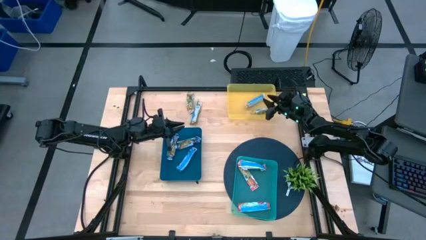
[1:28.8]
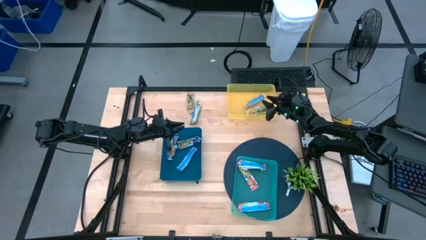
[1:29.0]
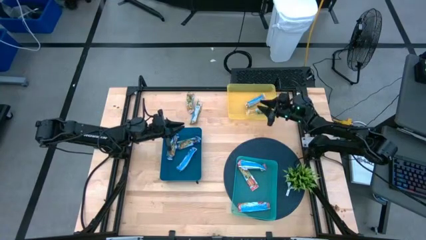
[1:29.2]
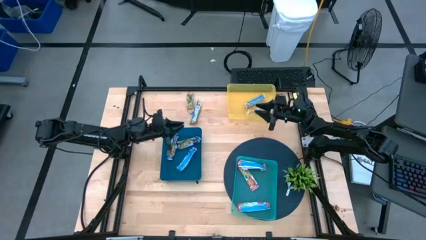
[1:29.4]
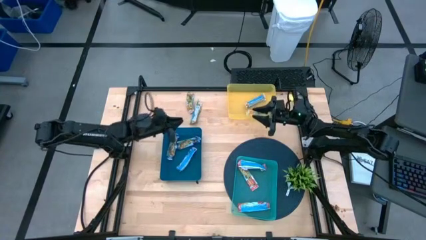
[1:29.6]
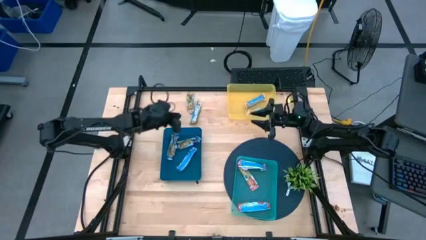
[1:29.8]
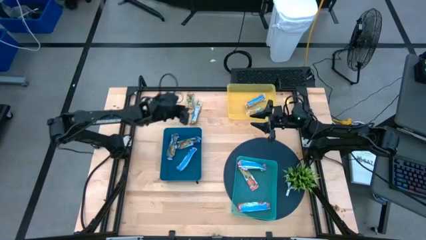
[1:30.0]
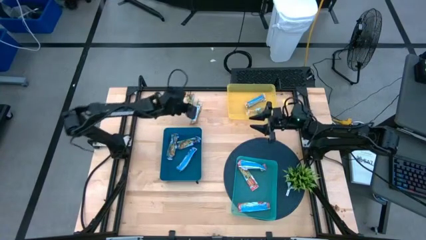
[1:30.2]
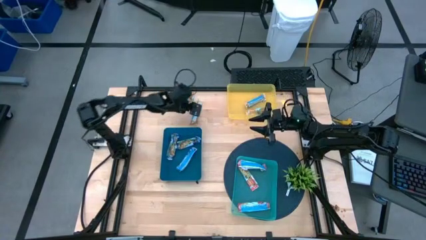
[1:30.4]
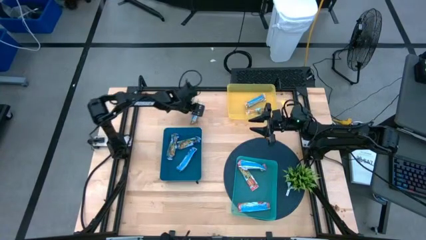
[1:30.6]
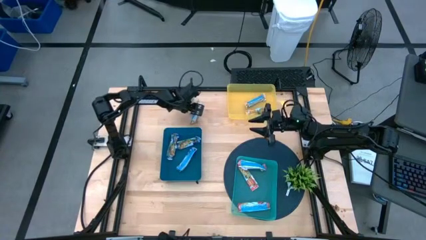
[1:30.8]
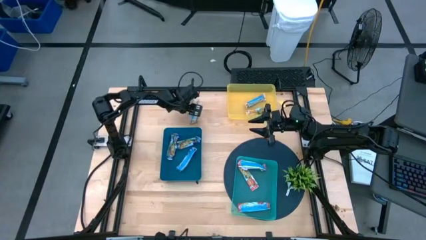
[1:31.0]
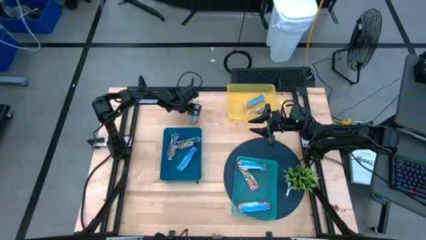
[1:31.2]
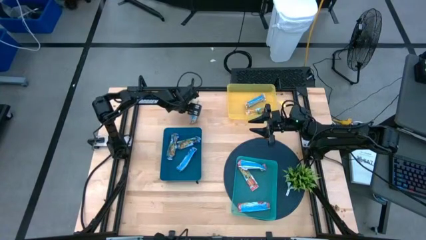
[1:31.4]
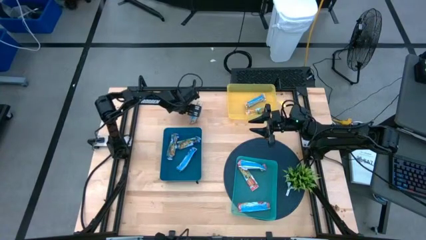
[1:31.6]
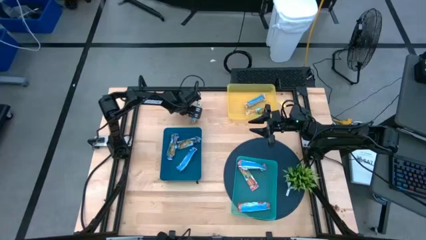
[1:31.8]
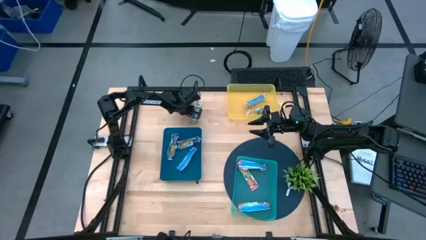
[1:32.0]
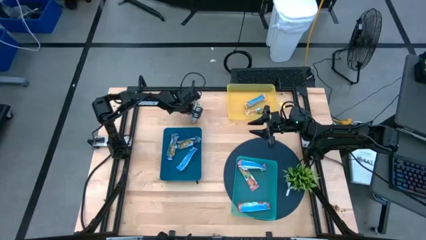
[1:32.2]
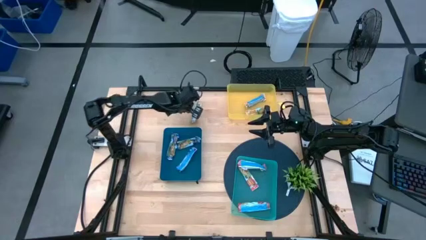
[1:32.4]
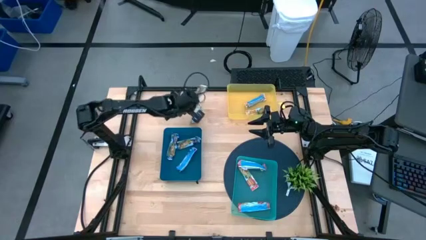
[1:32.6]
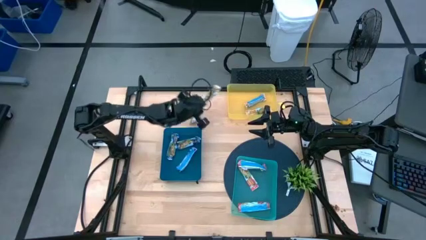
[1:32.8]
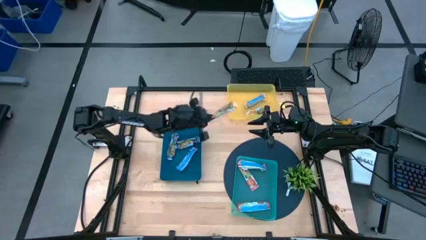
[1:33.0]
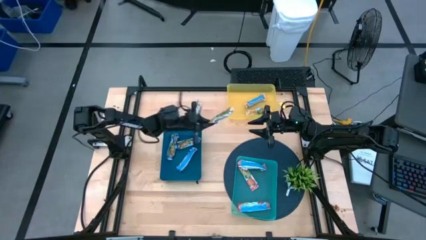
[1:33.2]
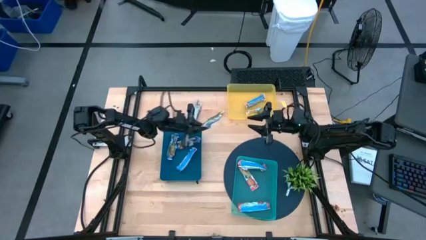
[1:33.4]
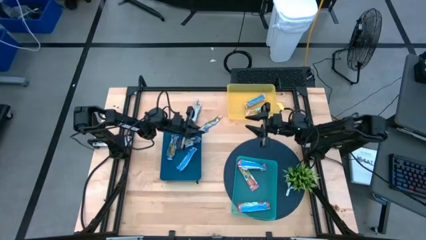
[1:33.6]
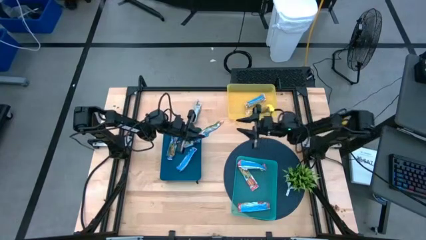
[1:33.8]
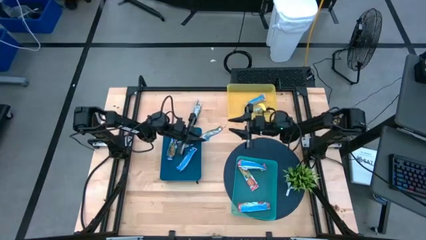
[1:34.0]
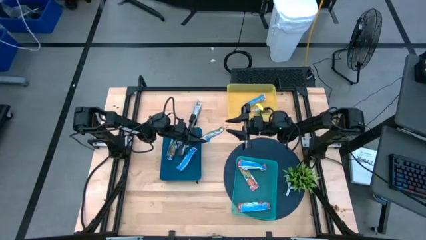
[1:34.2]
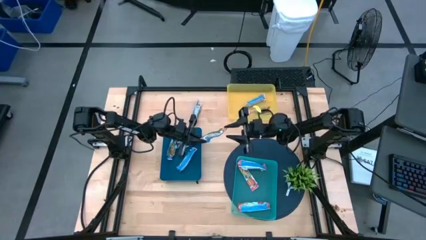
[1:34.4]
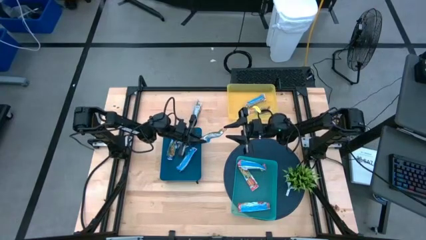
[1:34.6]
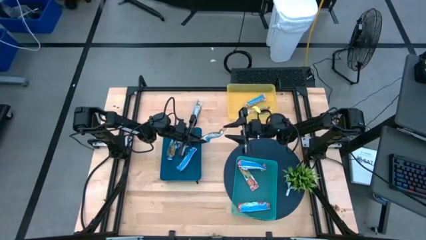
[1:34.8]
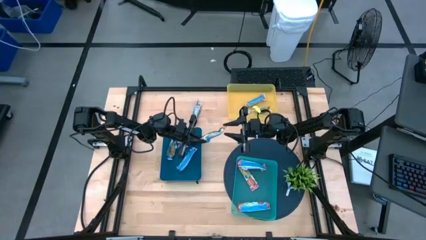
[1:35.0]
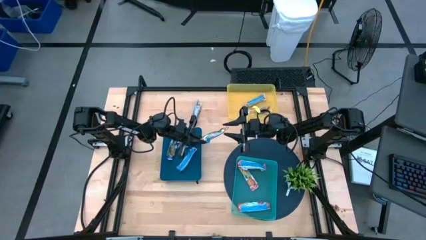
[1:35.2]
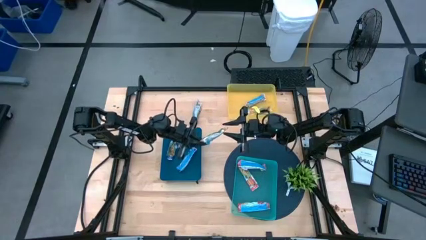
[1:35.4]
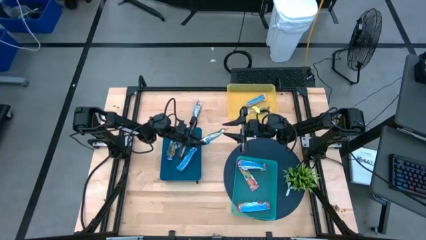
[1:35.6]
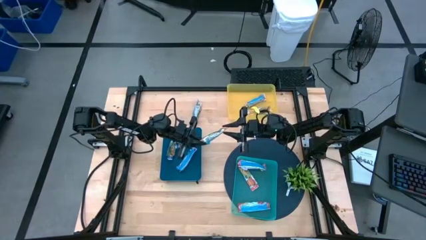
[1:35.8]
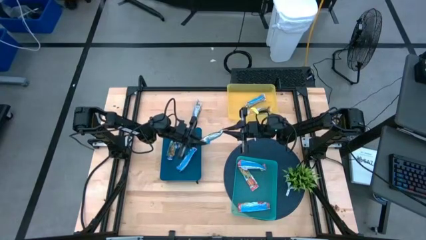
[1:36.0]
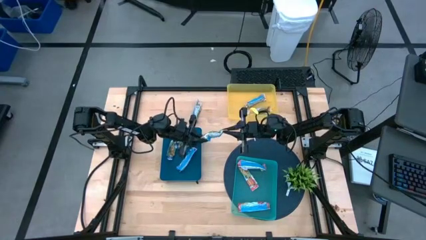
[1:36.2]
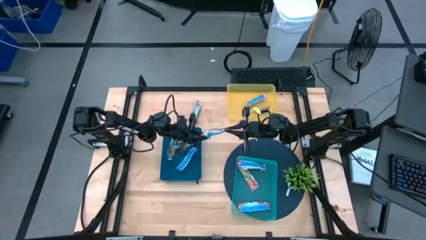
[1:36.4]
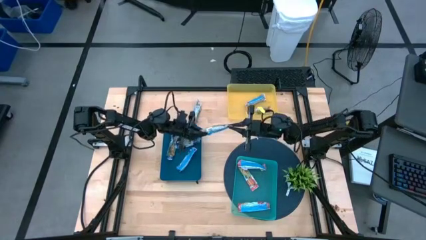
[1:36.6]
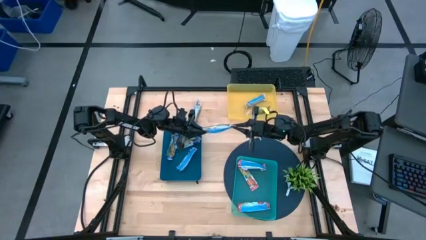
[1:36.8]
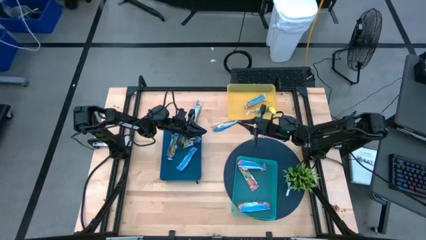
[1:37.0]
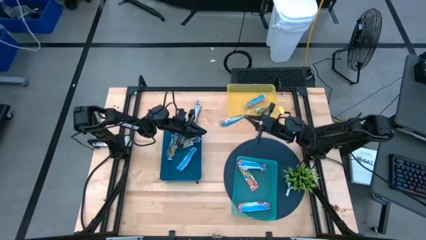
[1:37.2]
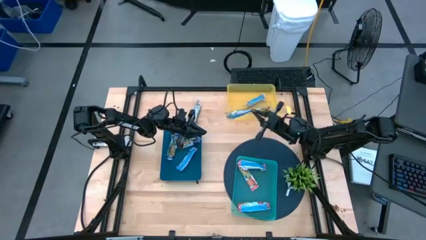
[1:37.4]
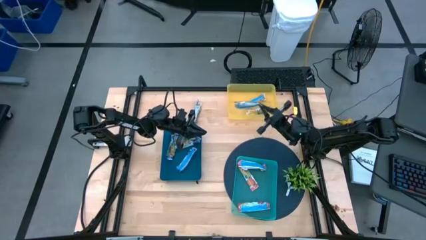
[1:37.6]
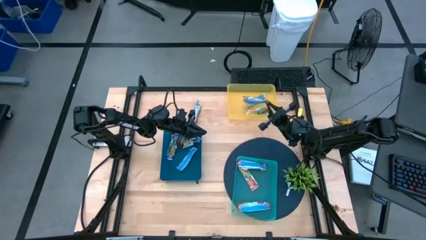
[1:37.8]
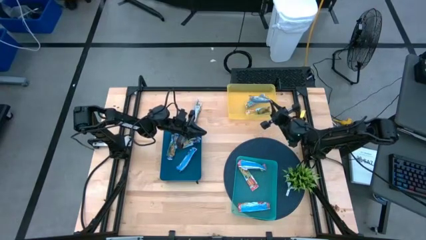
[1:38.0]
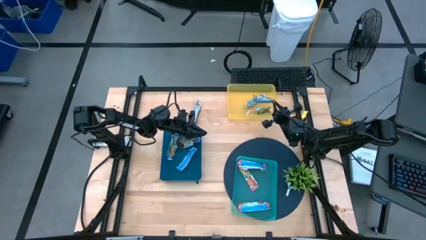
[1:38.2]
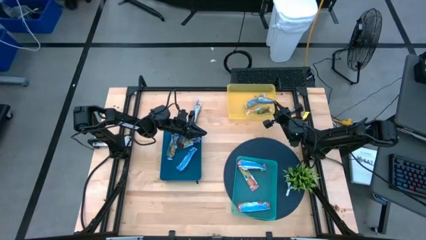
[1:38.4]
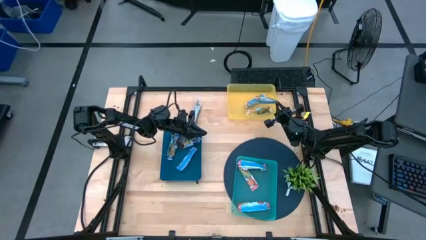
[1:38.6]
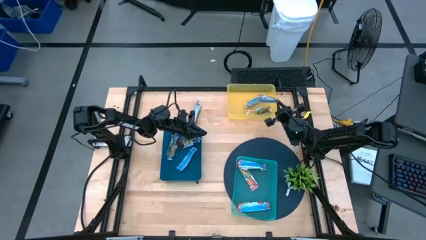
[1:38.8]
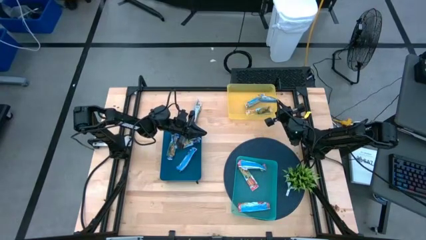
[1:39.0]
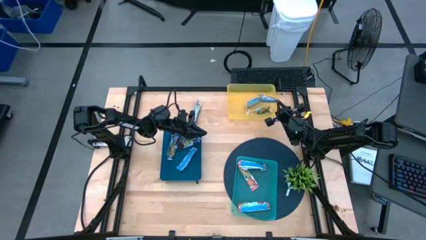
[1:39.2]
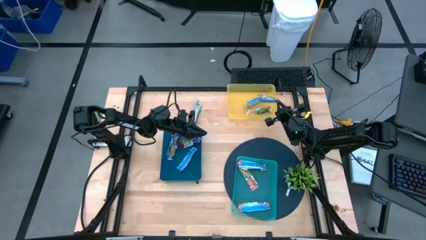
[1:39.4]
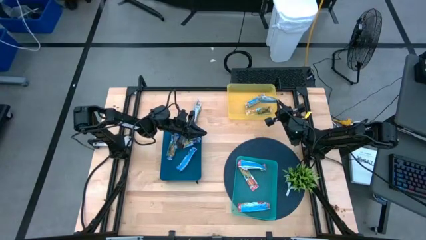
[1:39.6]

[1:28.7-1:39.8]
Task: Pick and place Granola Bars by type
Put the yellow granola bar into the yellow bin

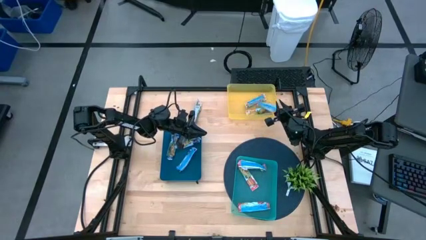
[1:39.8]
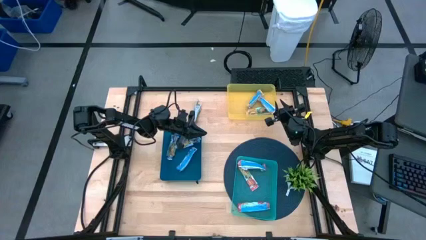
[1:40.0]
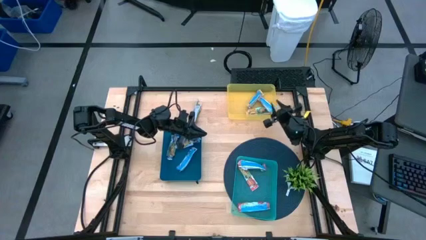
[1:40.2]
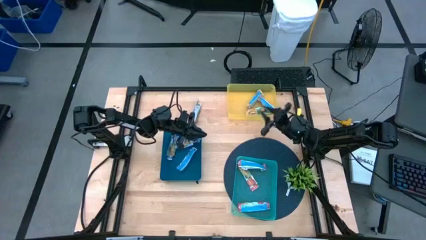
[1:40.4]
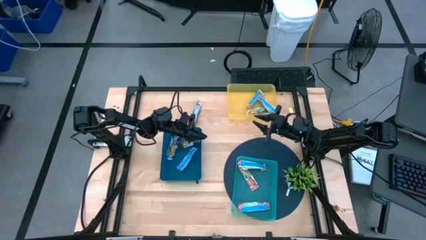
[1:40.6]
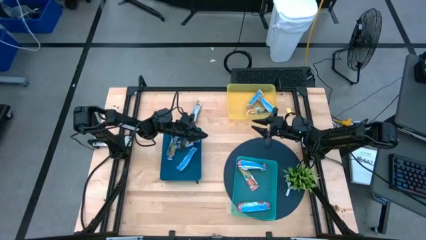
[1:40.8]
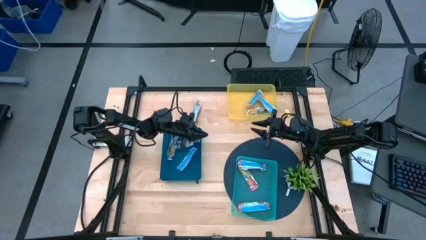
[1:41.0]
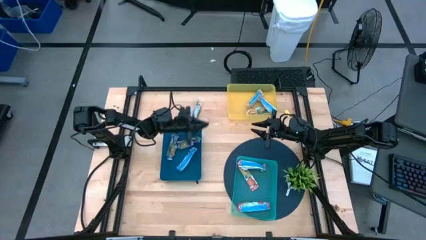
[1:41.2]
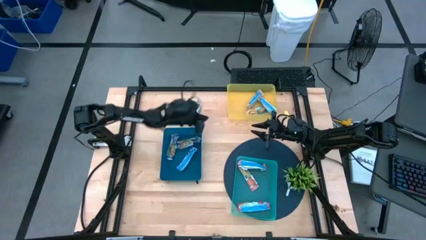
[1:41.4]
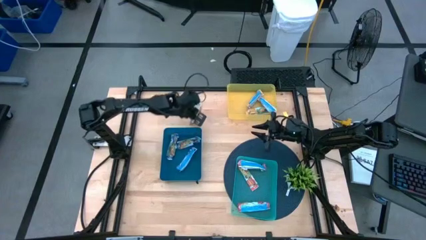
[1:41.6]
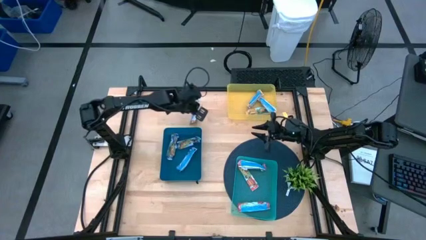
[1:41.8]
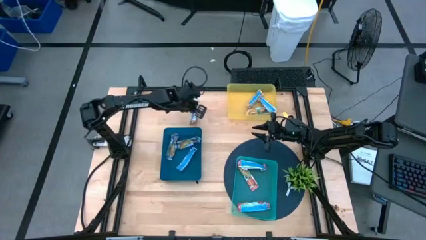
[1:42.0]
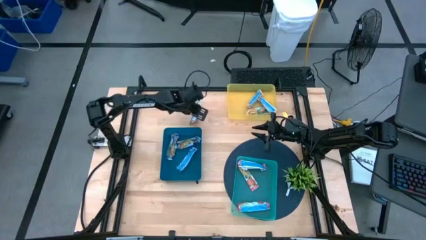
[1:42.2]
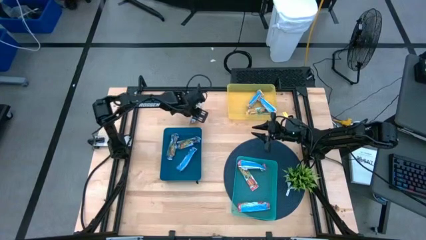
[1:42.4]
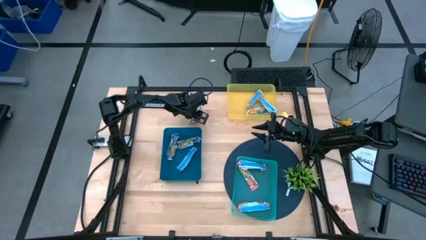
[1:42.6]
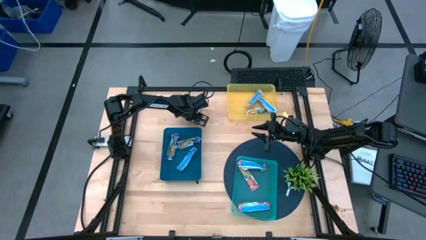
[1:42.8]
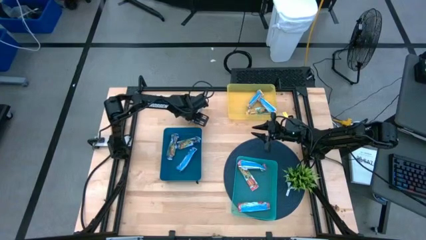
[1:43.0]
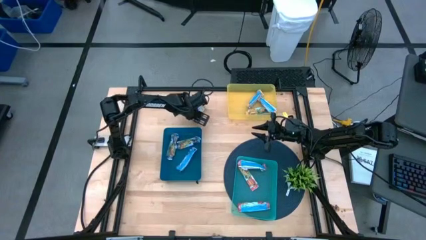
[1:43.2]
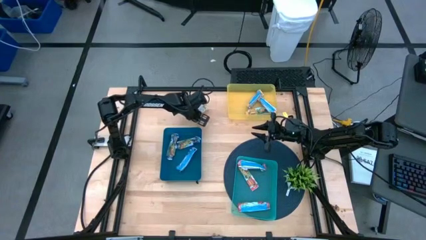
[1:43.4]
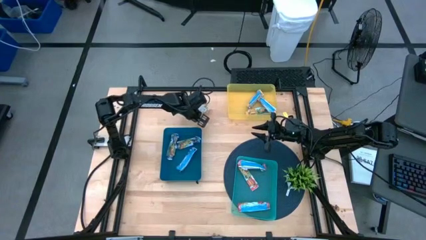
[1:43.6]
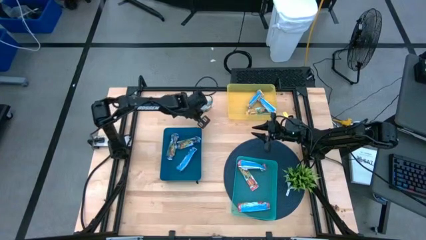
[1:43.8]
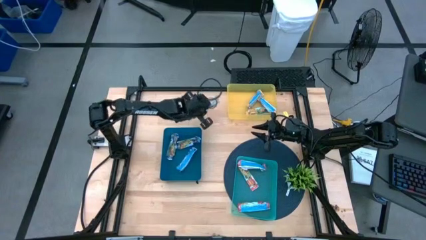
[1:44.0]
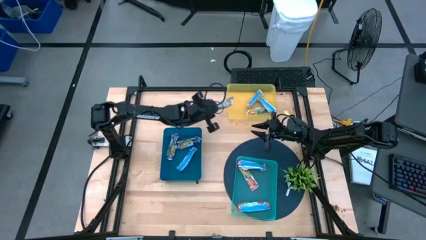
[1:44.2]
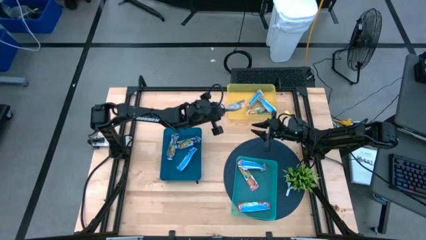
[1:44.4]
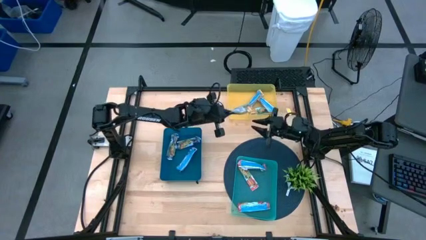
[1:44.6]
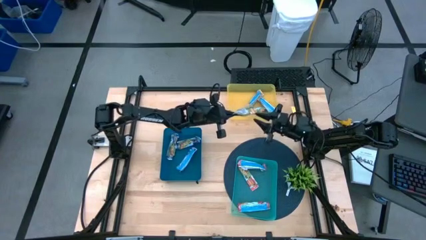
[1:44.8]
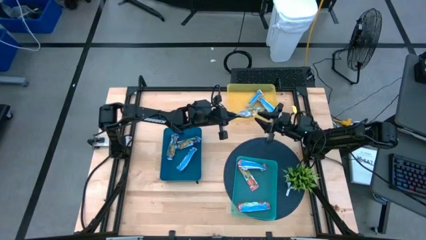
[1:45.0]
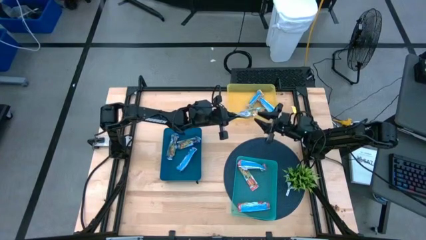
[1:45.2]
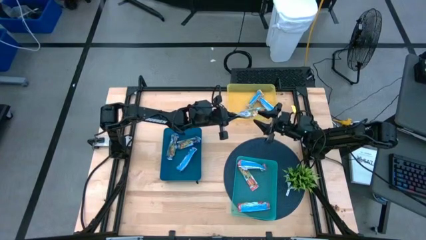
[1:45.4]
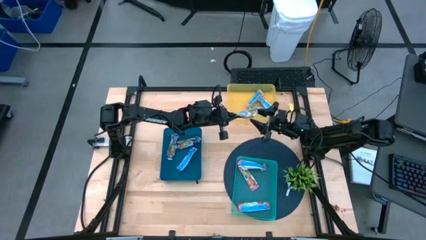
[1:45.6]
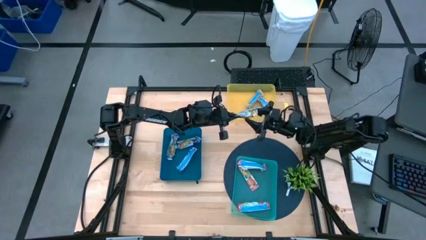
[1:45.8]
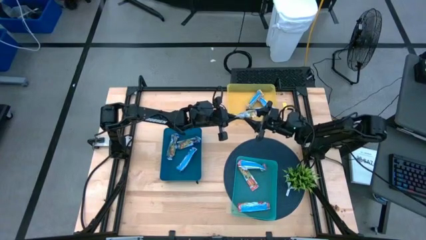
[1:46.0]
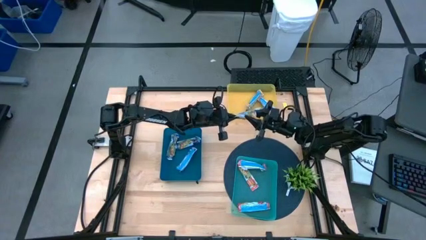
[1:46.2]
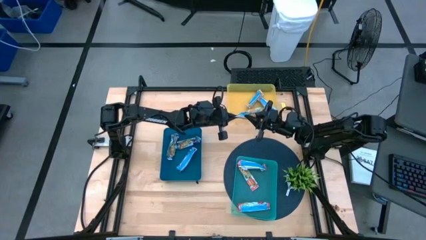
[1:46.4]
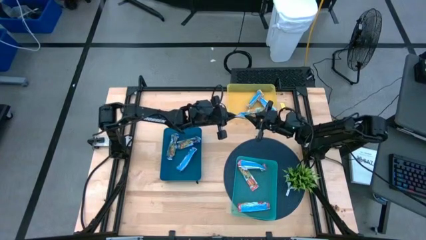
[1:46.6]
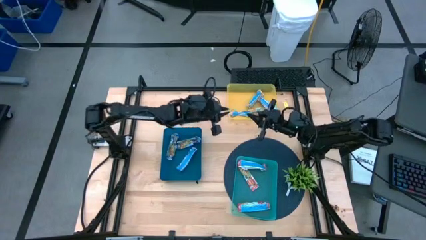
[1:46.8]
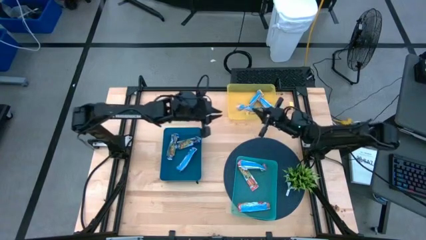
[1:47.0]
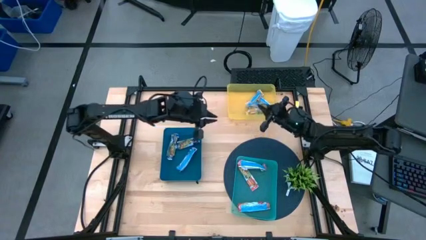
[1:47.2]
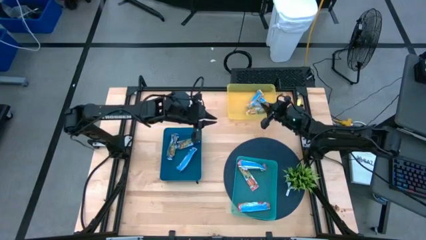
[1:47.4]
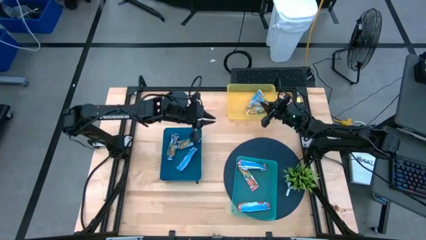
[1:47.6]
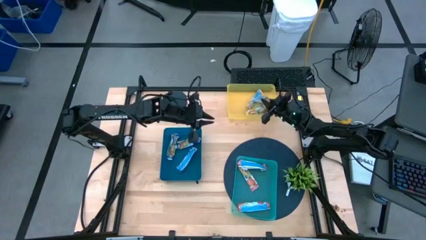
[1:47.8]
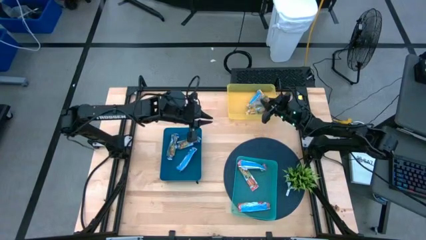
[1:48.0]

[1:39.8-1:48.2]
Put the yellow granola bar into the yellow bin
